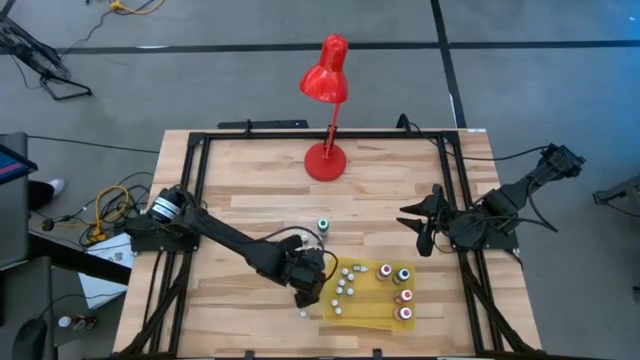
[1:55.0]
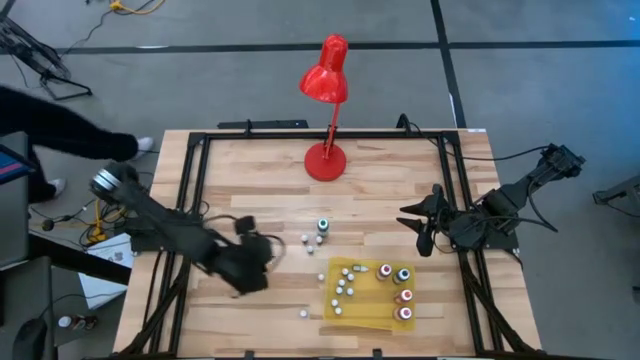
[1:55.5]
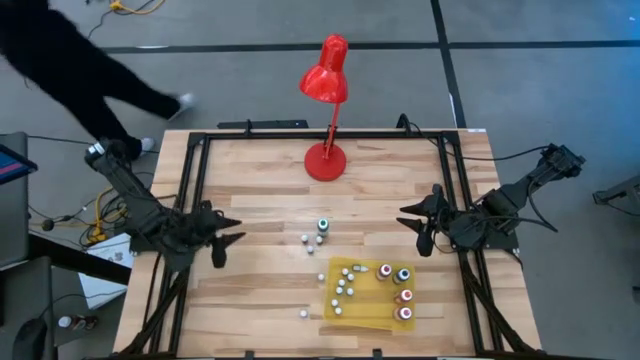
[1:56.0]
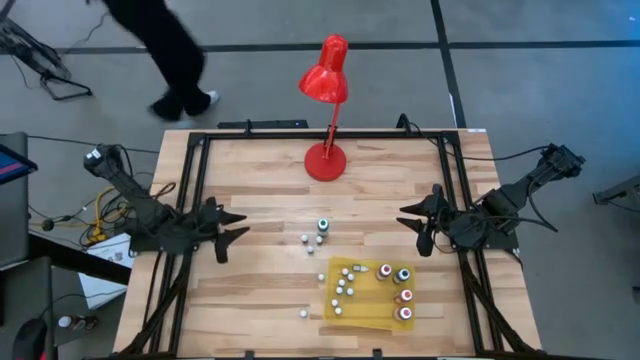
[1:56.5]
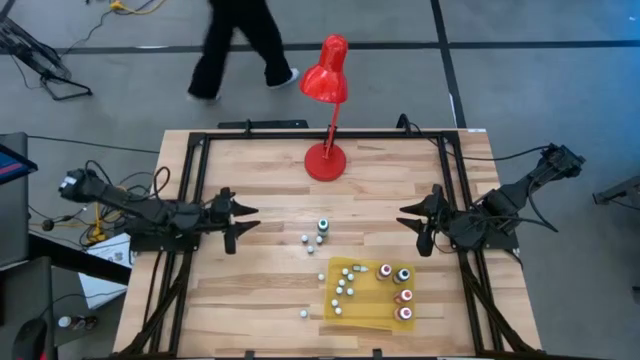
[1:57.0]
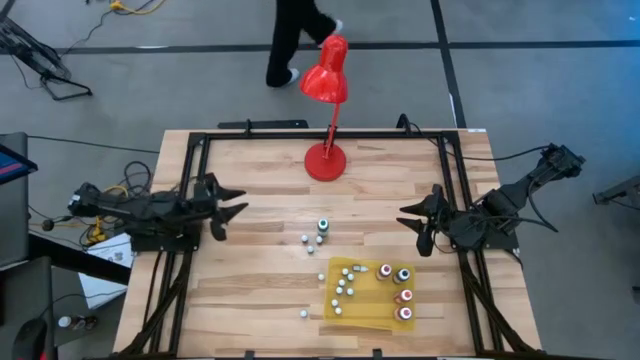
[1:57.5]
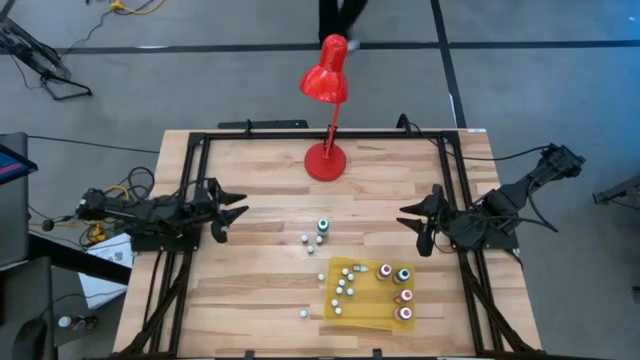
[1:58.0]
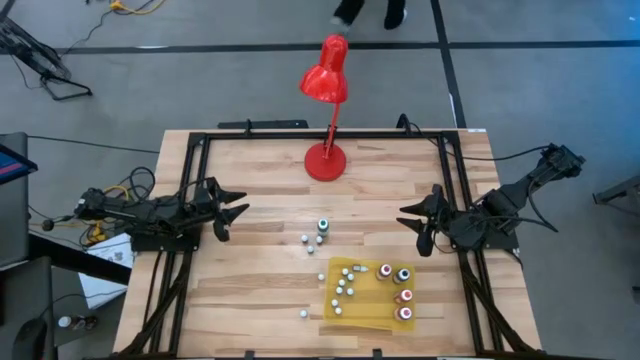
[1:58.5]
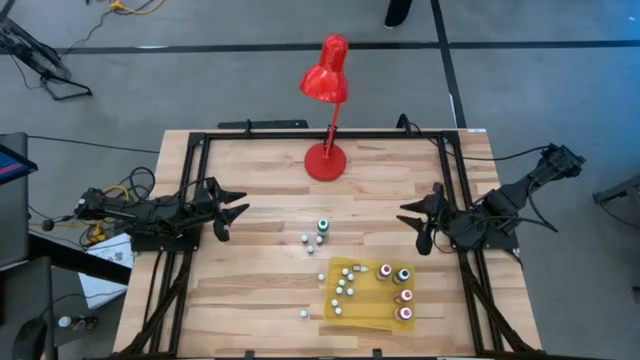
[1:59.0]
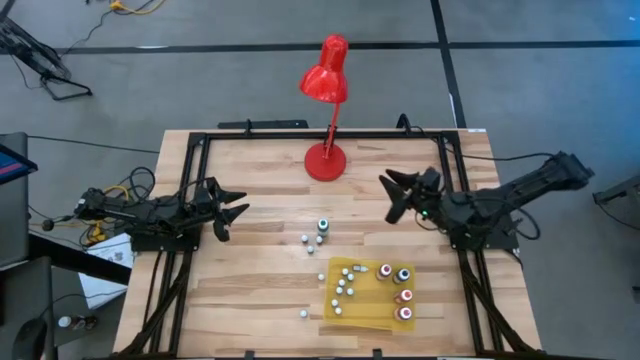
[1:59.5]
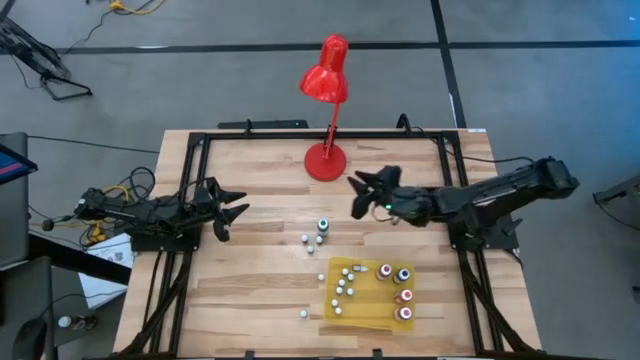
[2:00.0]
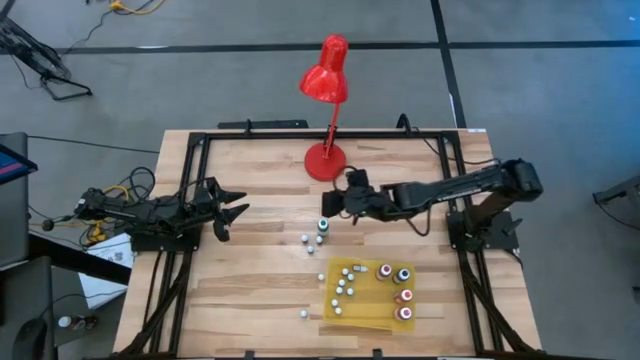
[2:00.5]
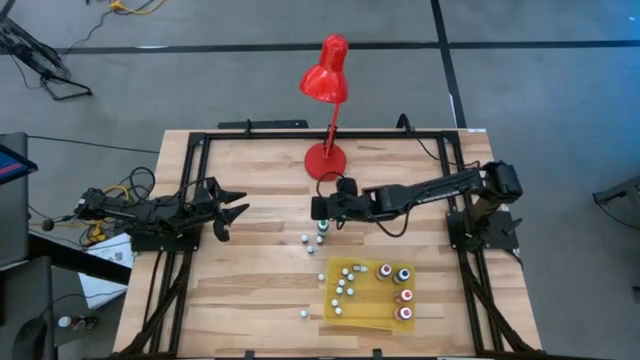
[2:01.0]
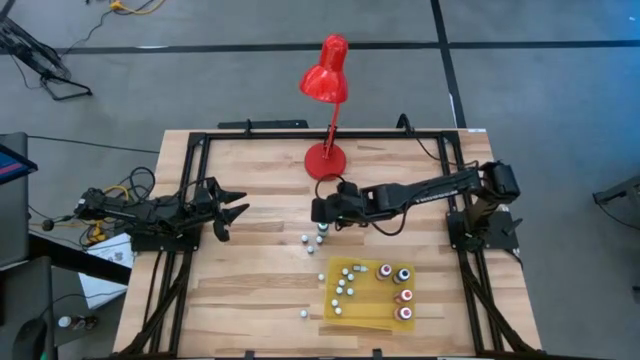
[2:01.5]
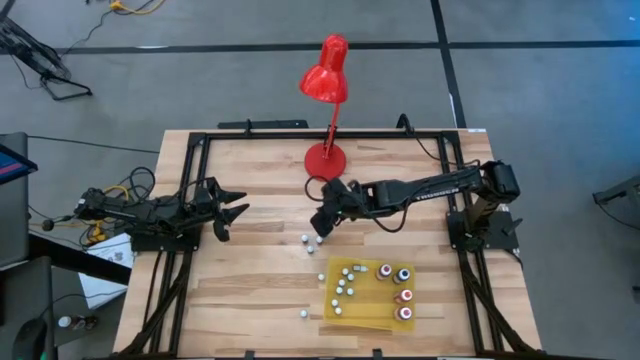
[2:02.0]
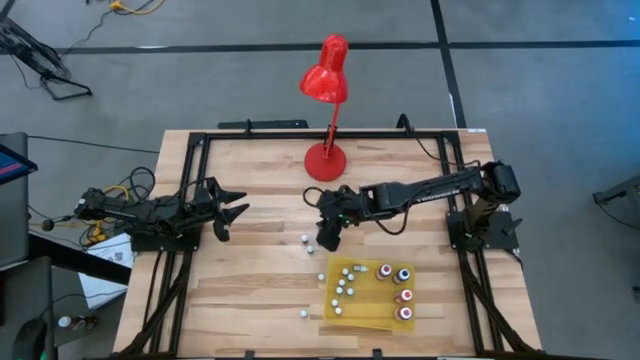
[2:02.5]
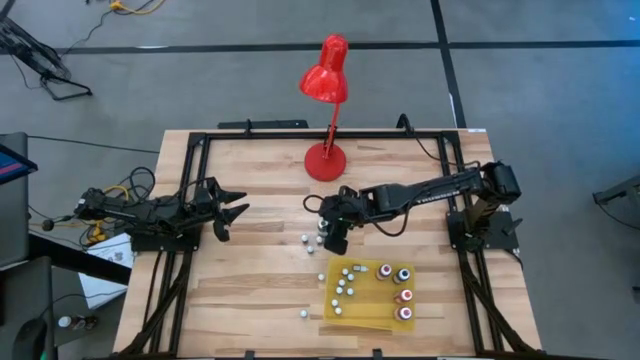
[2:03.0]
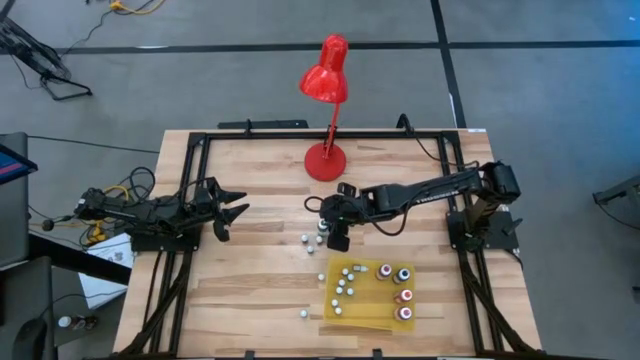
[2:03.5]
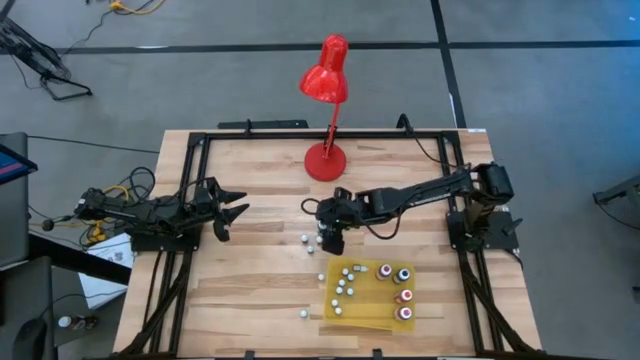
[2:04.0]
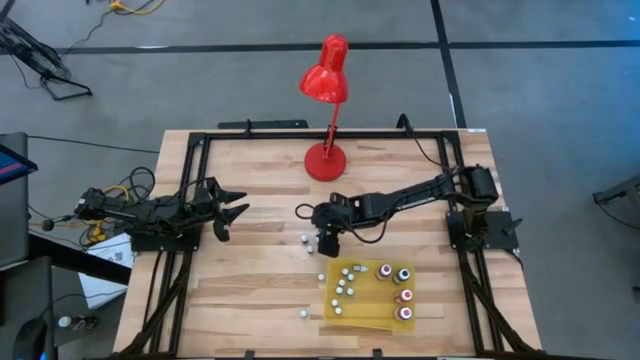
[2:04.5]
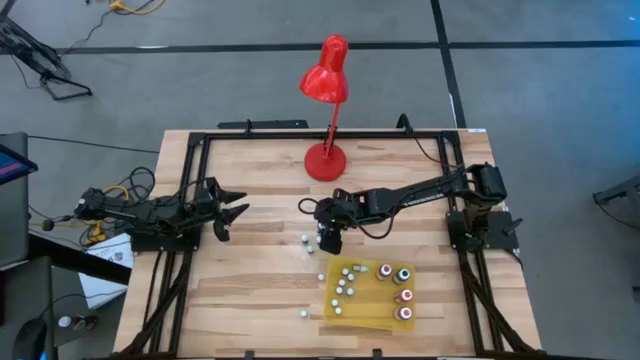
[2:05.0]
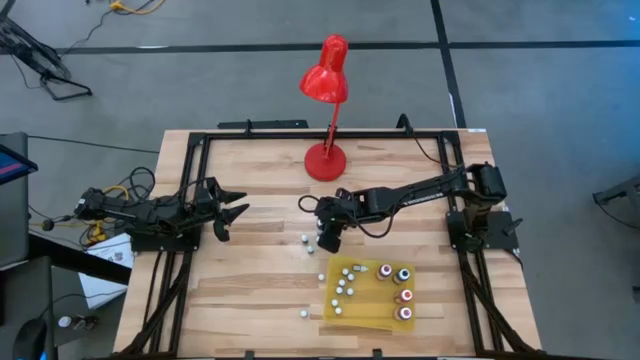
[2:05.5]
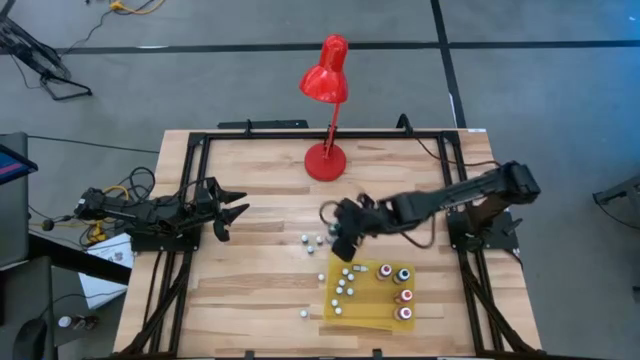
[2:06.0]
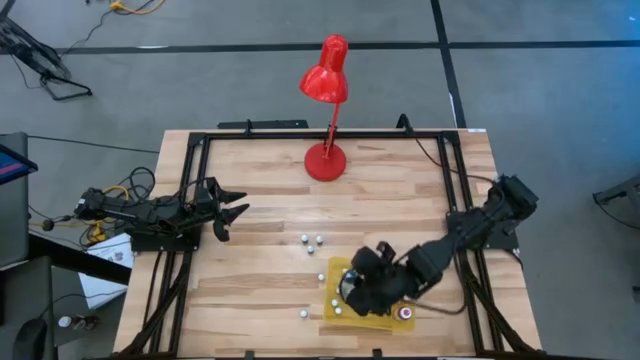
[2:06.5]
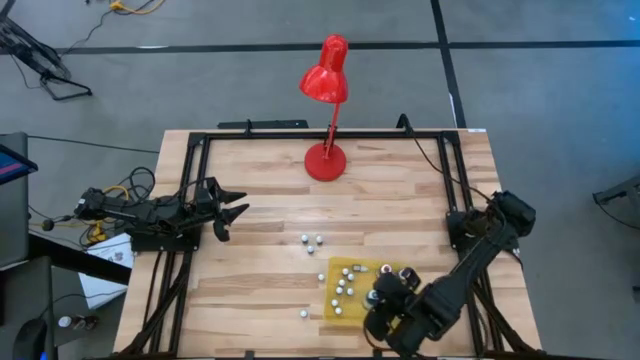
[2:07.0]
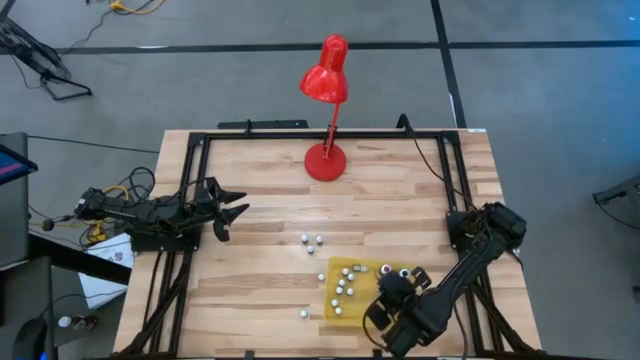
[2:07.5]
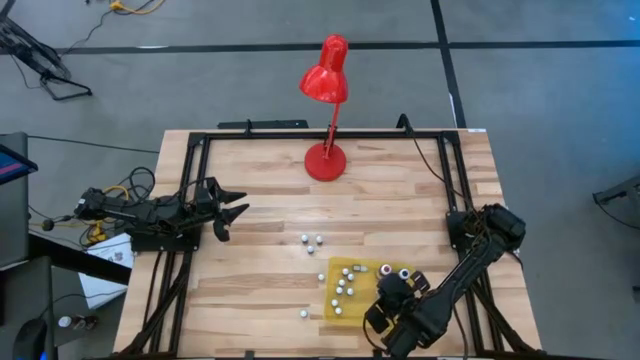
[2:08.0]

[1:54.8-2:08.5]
Task: Pick & Place food coloring
Put the large green food coloring into the yellow bin

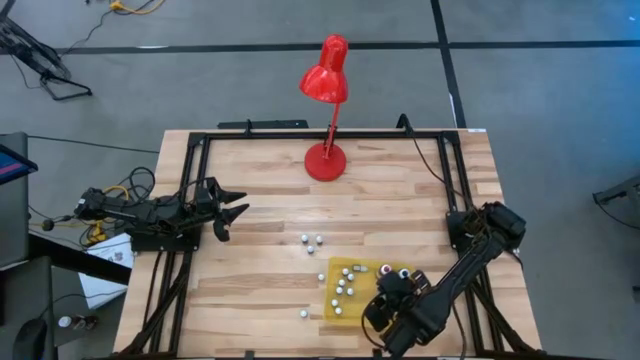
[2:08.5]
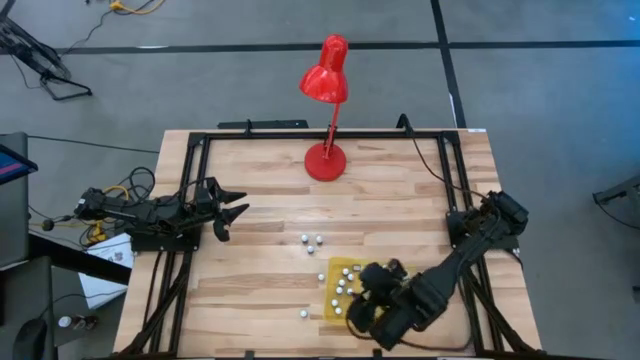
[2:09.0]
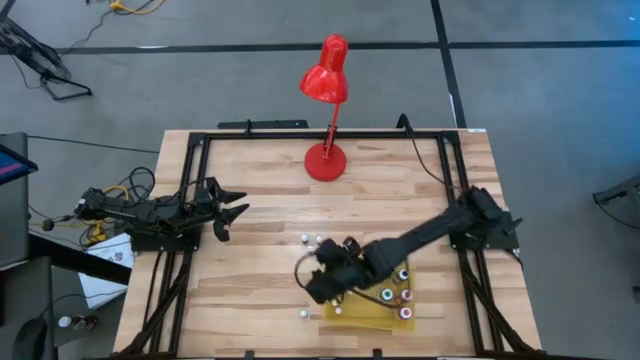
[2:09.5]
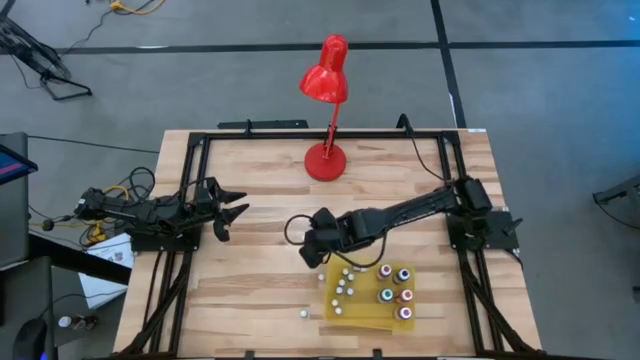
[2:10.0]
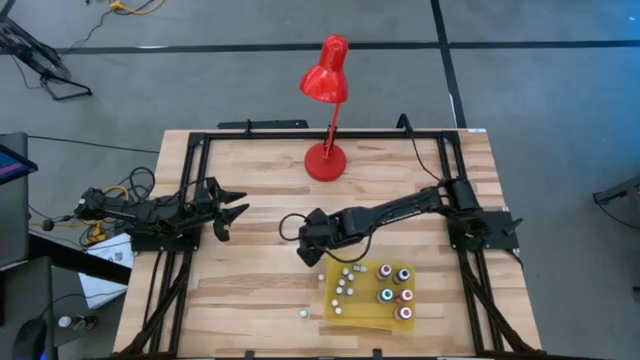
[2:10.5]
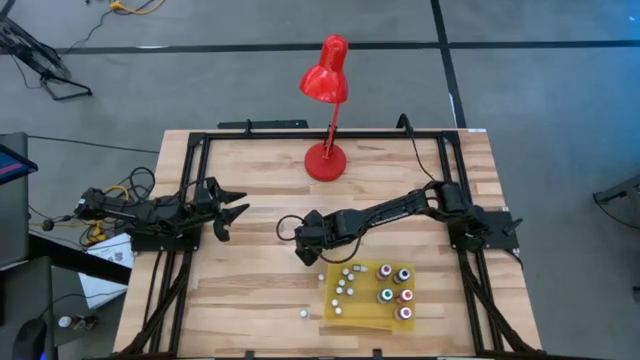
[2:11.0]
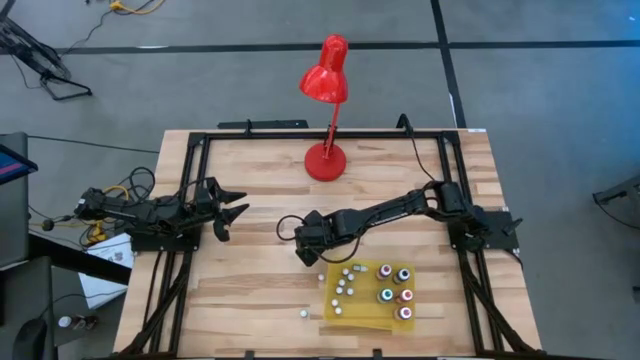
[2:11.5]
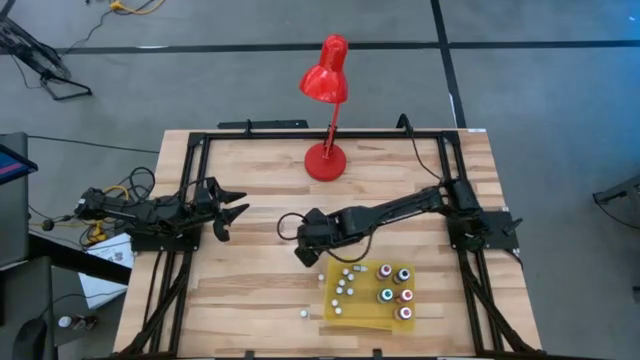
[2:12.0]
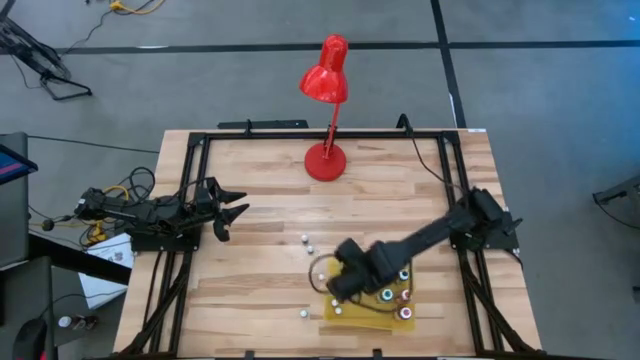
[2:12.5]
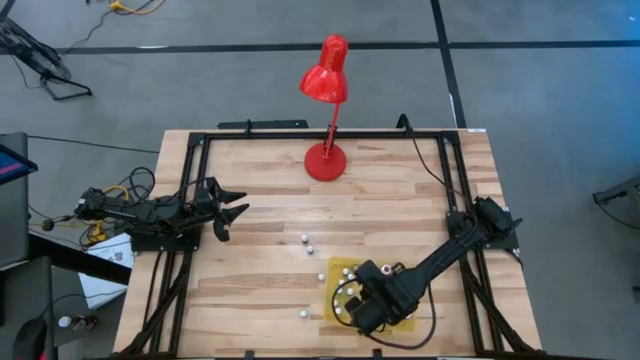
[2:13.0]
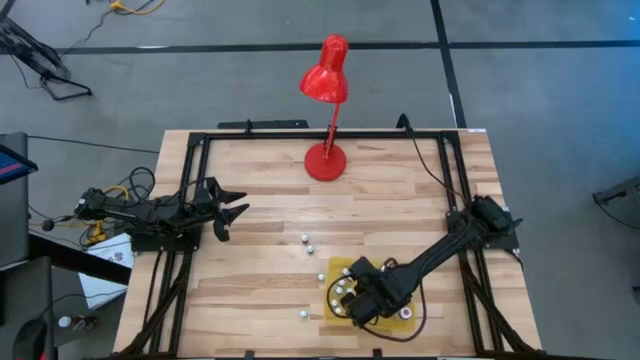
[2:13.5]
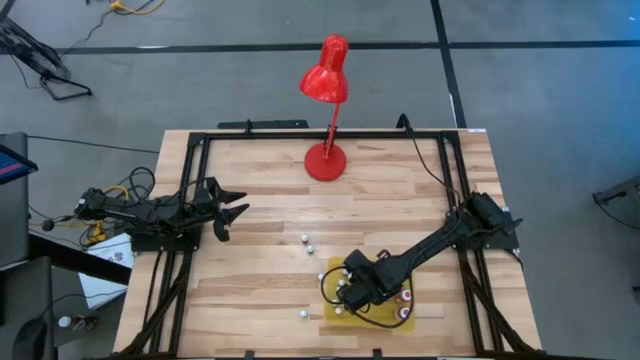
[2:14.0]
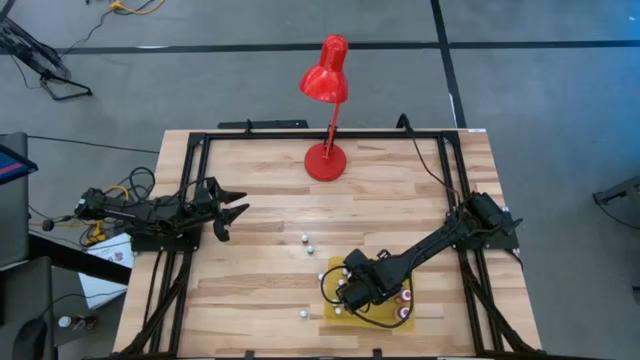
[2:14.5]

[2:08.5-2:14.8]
Put the blue food coloring into the yellow bin

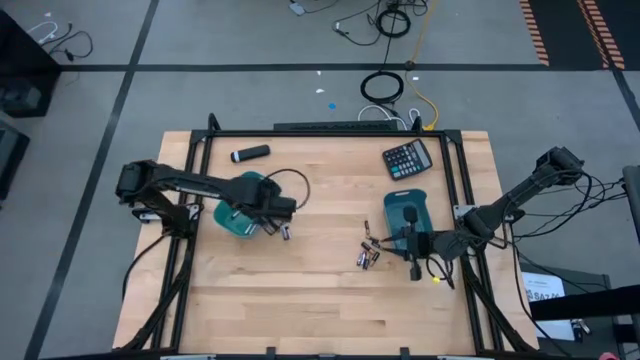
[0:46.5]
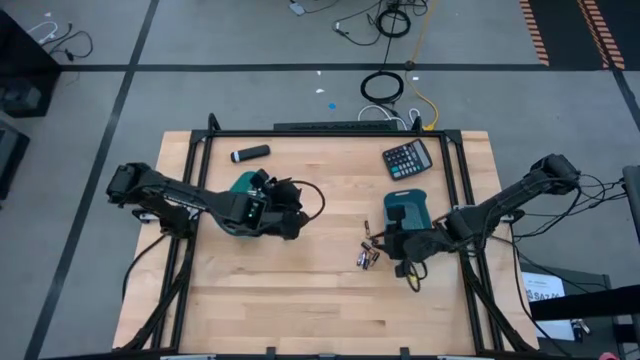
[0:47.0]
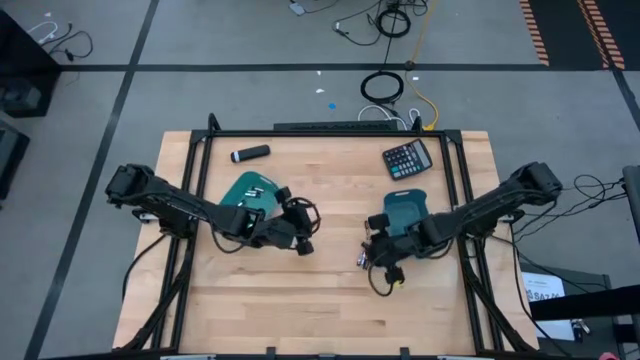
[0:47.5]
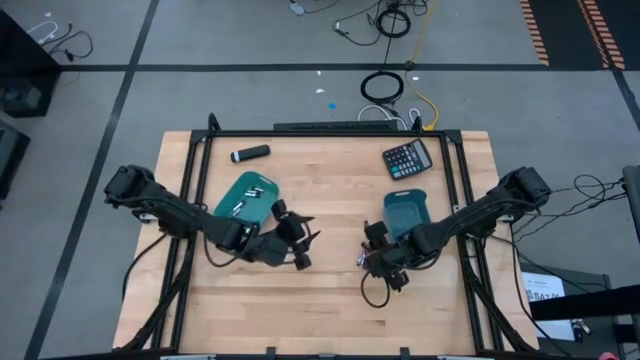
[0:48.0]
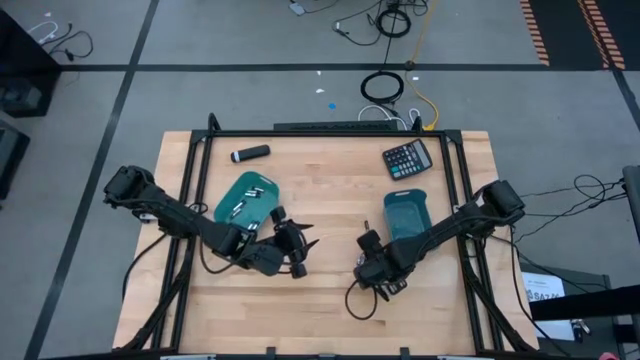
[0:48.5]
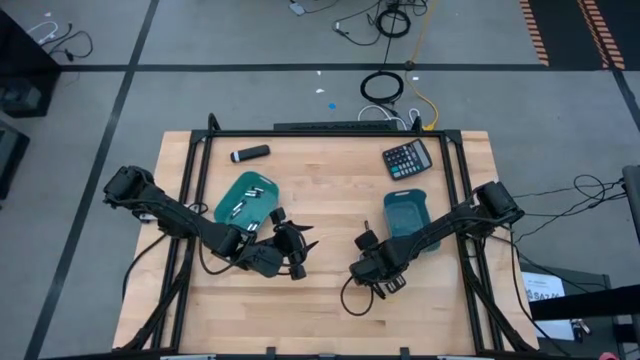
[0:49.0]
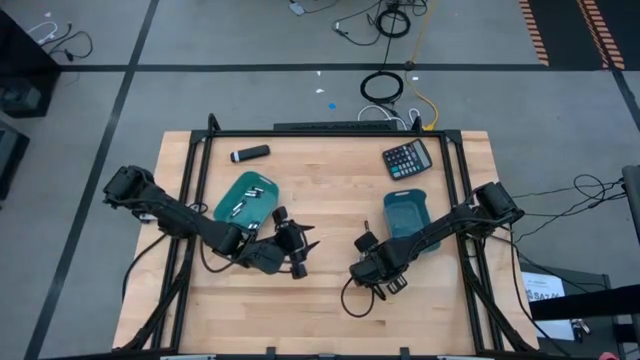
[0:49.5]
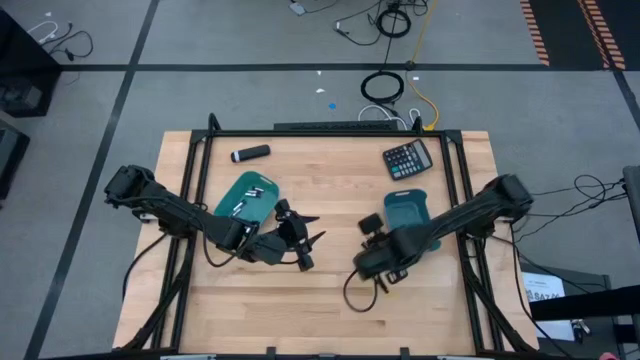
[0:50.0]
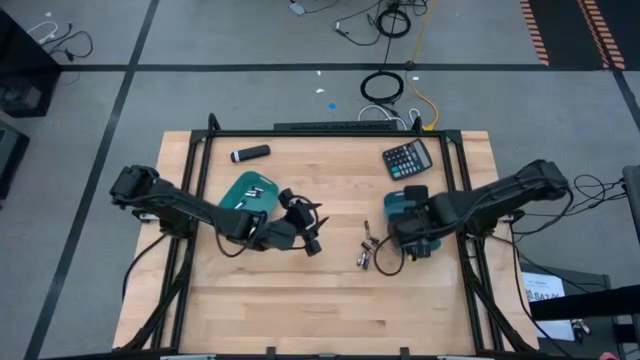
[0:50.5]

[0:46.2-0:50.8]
Task: Sort batteries
Put the black battery into the blue bin
